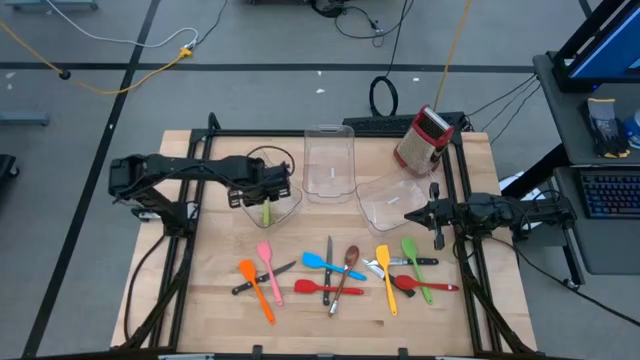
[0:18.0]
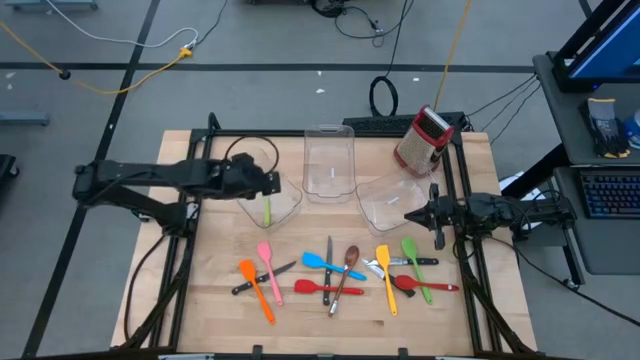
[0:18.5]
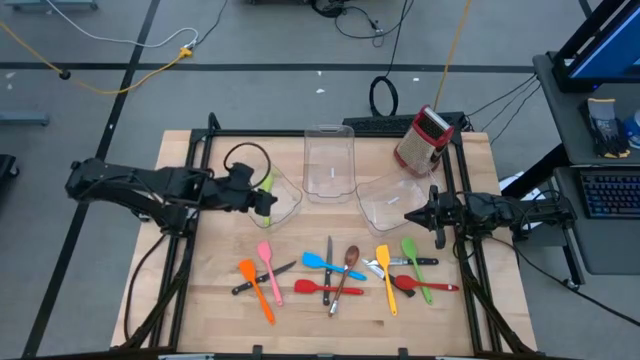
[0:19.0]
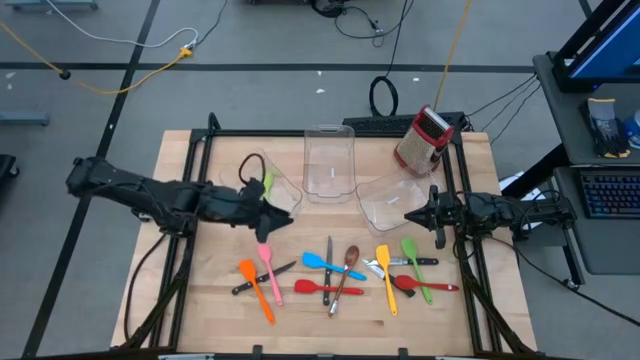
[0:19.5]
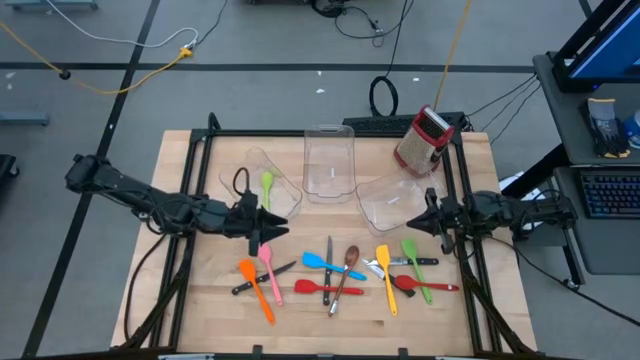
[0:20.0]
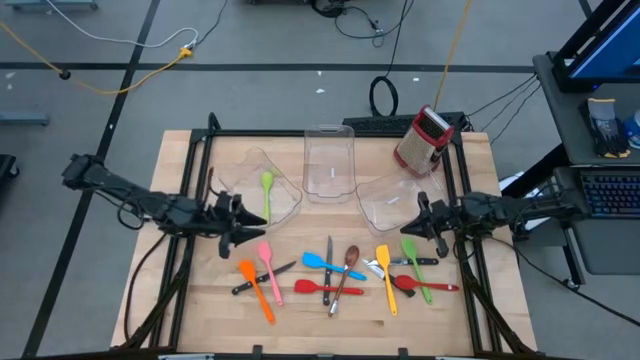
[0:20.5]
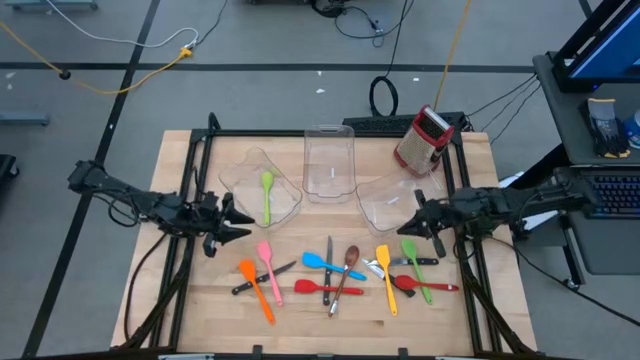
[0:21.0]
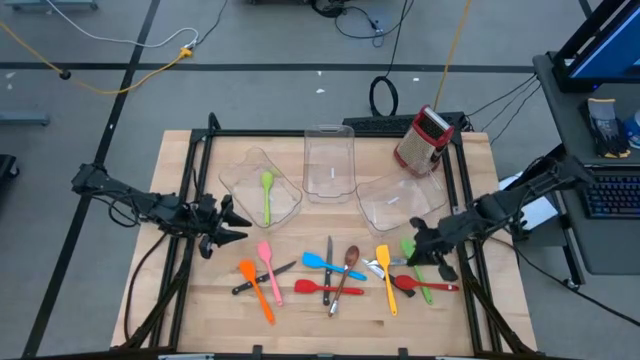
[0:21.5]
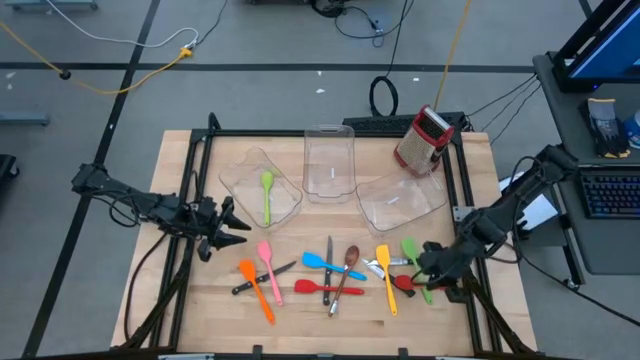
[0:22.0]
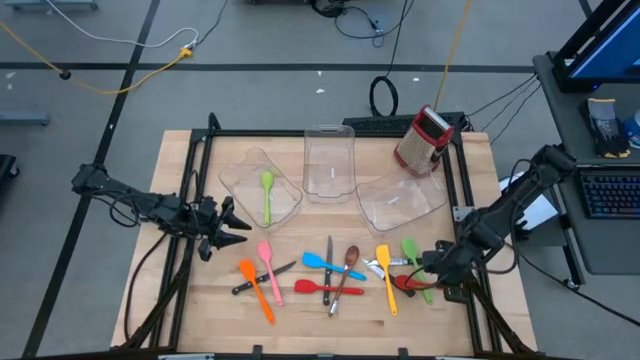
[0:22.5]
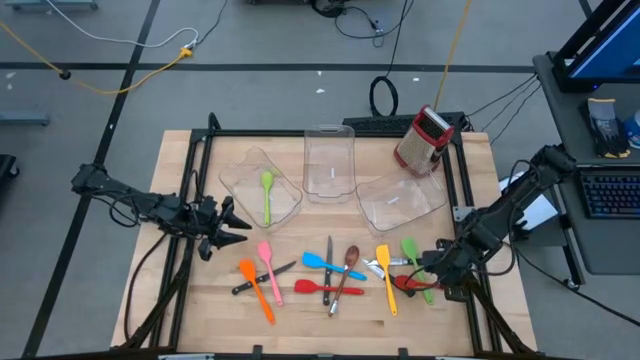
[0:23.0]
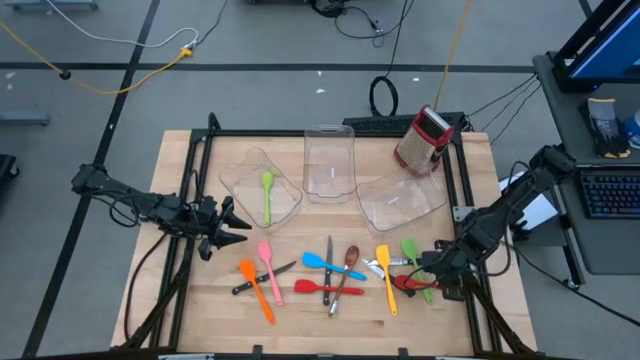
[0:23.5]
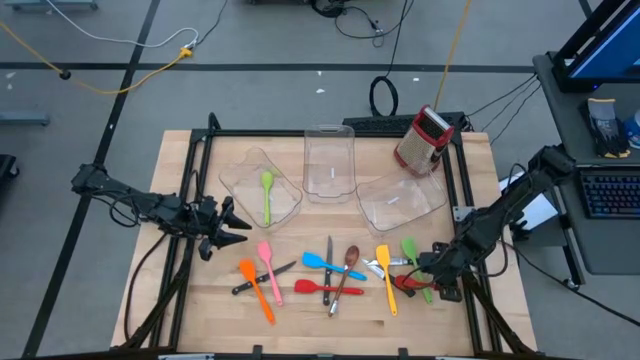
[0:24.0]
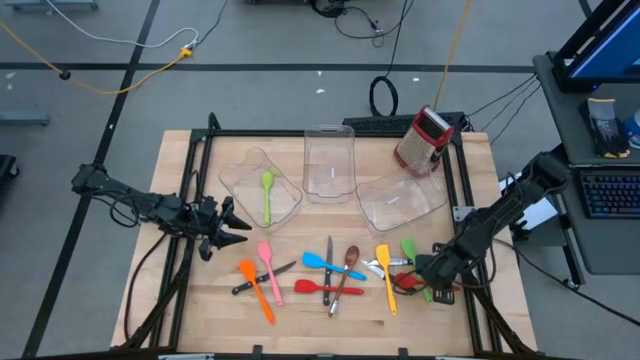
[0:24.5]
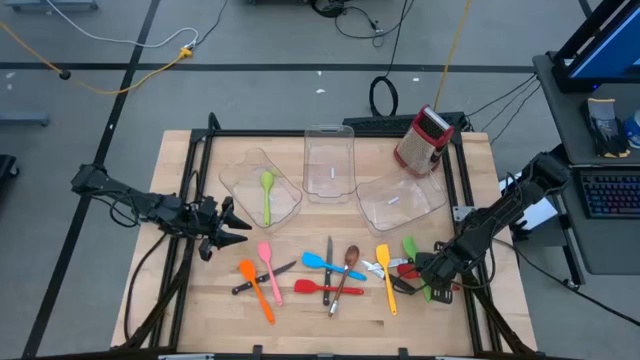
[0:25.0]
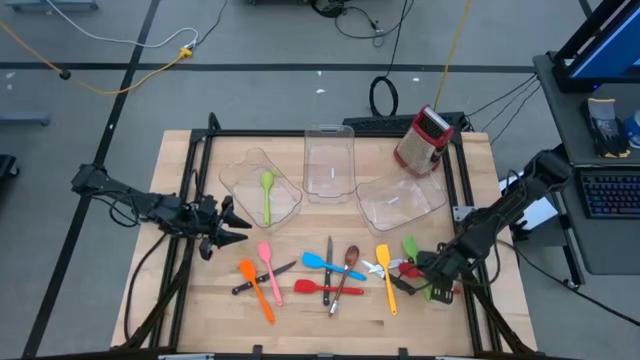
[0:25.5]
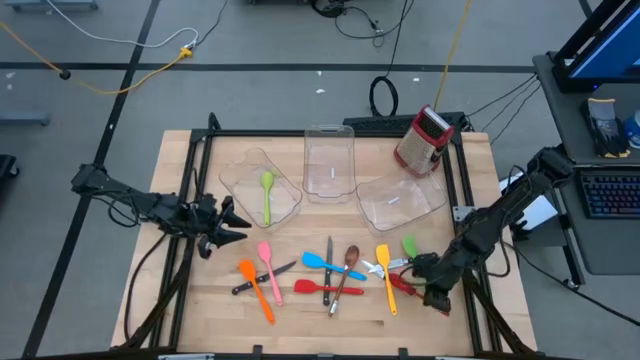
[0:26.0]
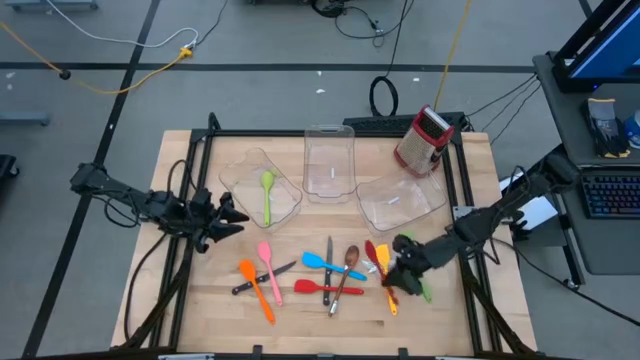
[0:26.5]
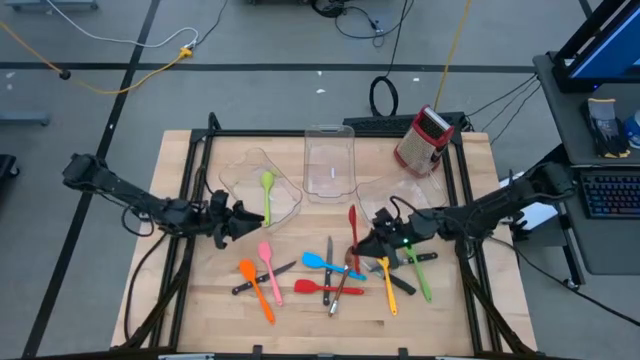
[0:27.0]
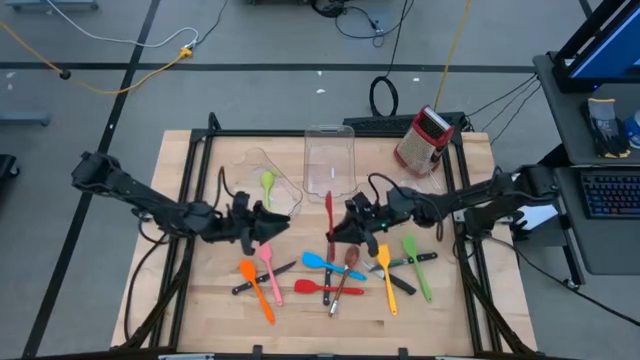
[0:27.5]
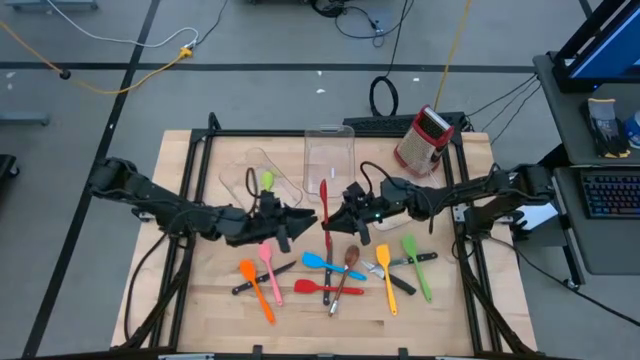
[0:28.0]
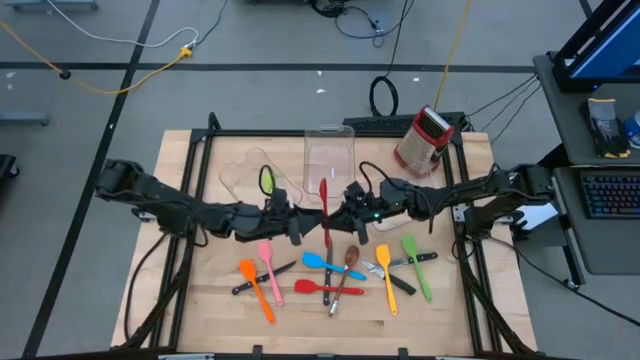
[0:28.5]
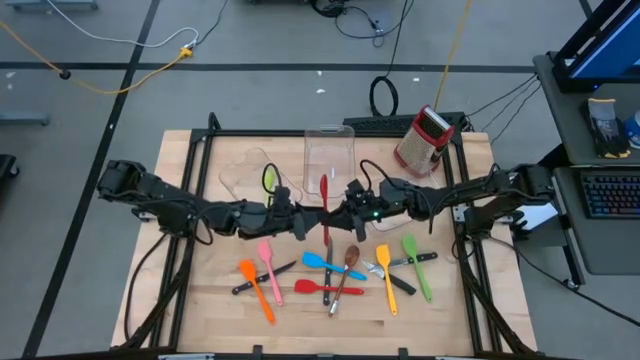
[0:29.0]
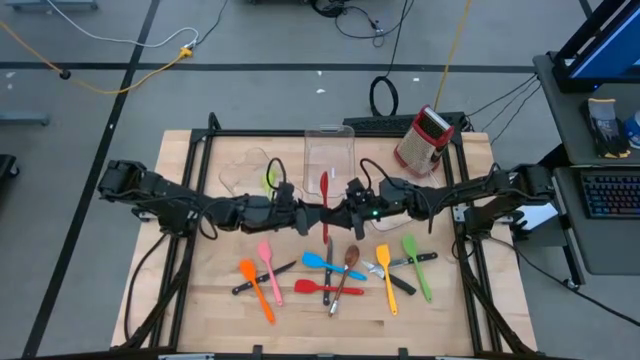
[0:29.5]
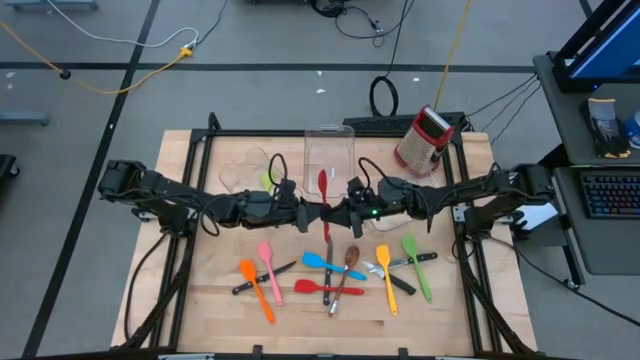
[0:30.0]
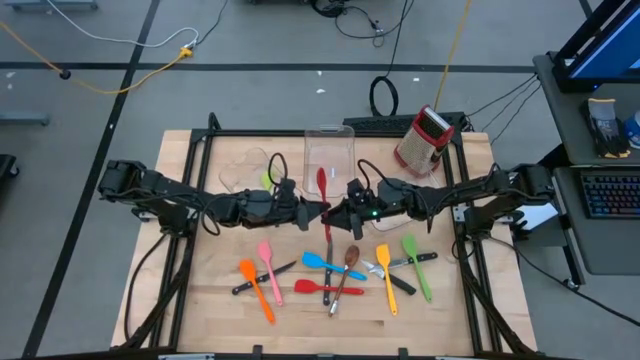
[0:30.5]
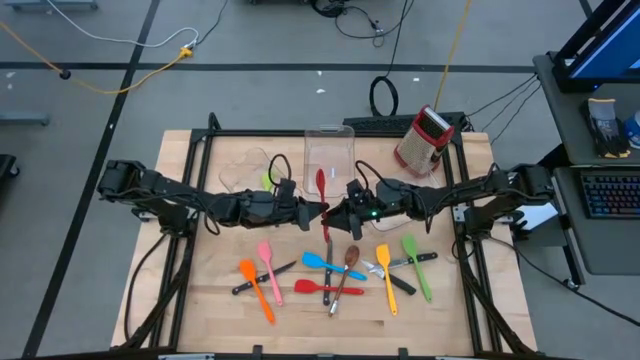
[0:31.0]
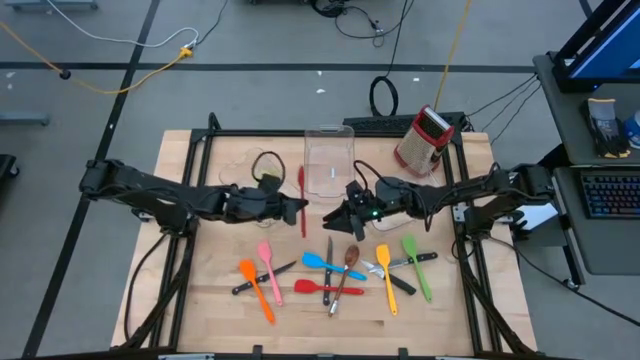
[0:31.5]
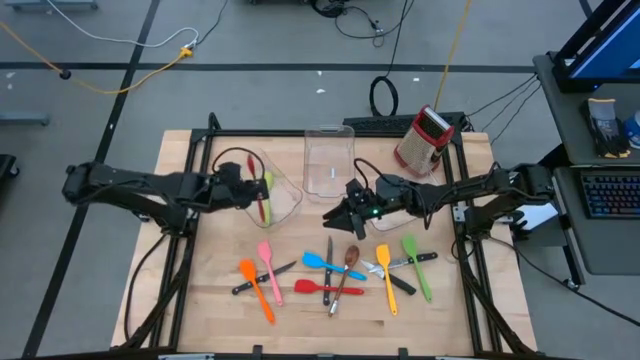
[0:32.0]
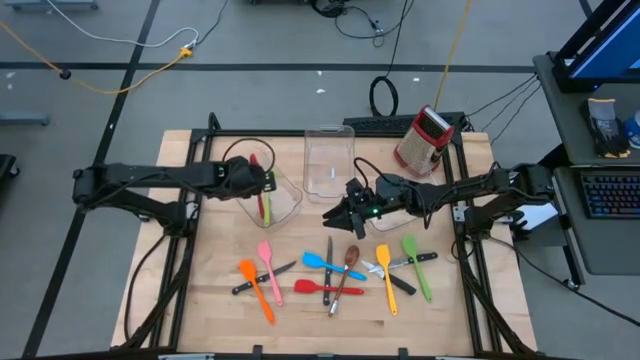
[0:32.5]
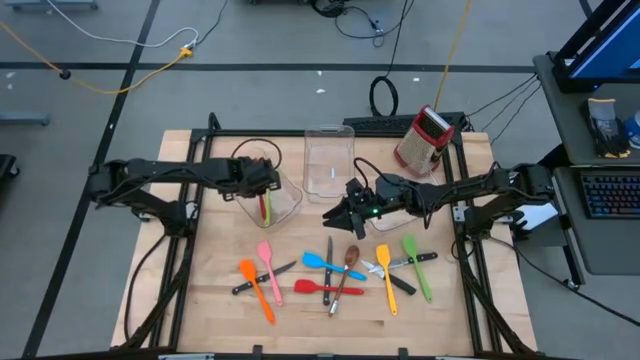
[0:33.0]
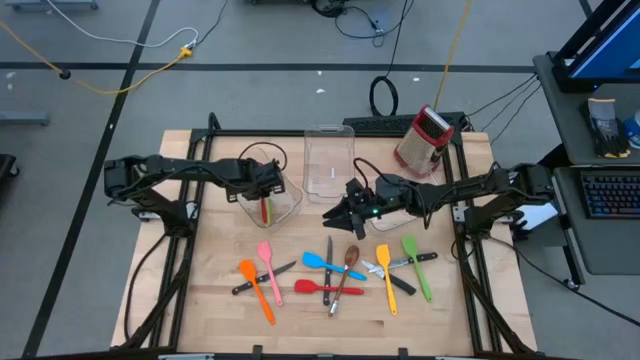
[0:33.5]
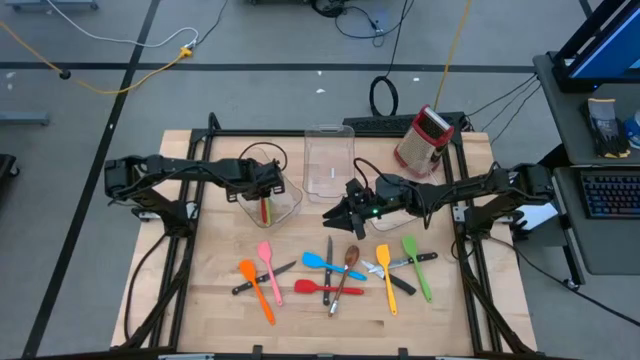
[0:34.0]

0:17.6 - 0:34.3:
Task: Pick & Place Kitchen Items
Put the right red serving spoon into the left bin

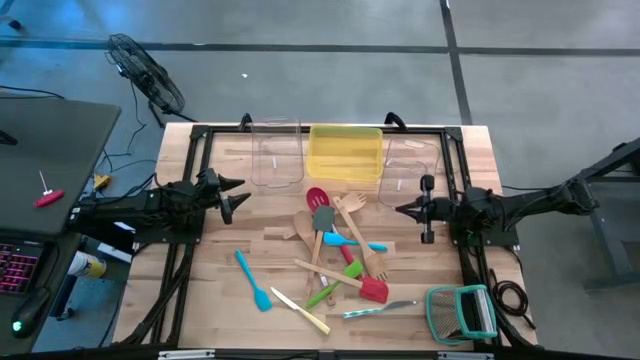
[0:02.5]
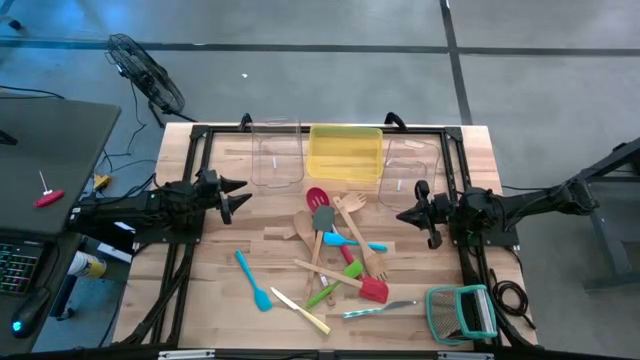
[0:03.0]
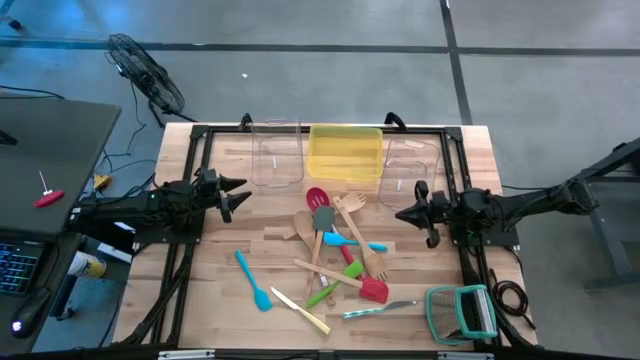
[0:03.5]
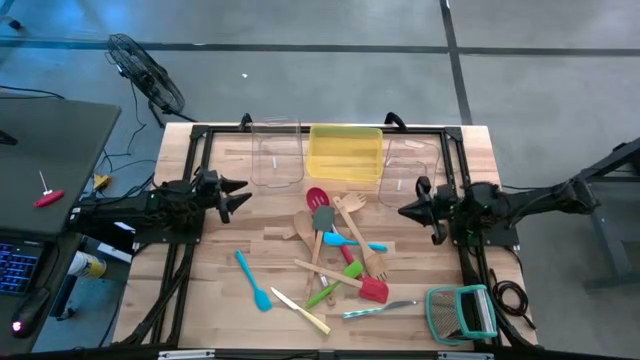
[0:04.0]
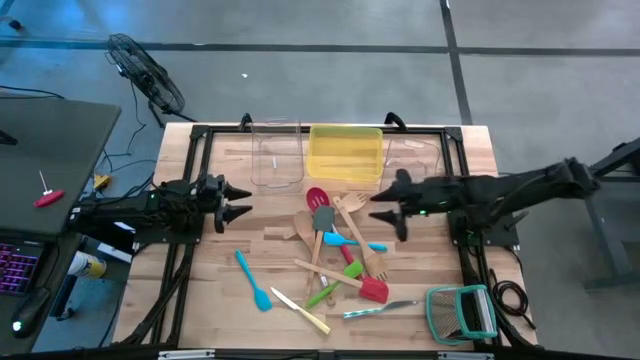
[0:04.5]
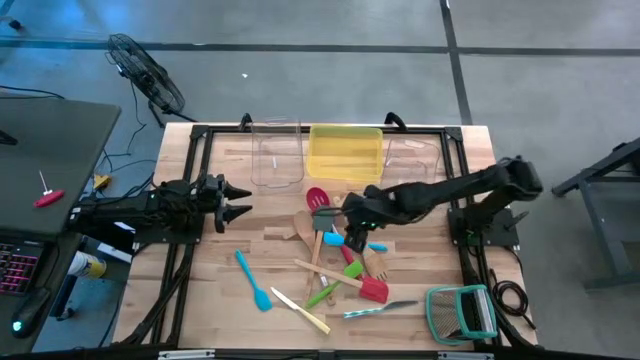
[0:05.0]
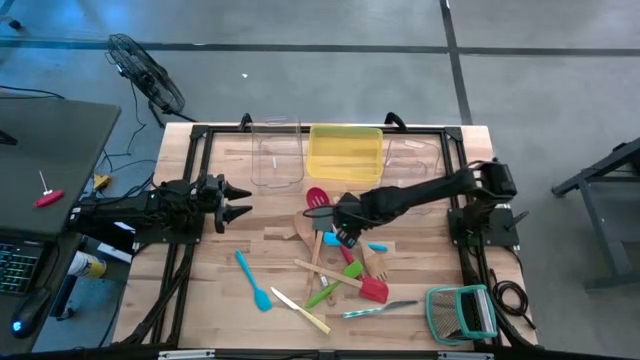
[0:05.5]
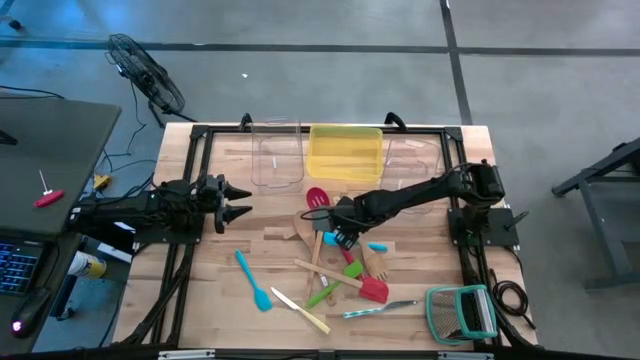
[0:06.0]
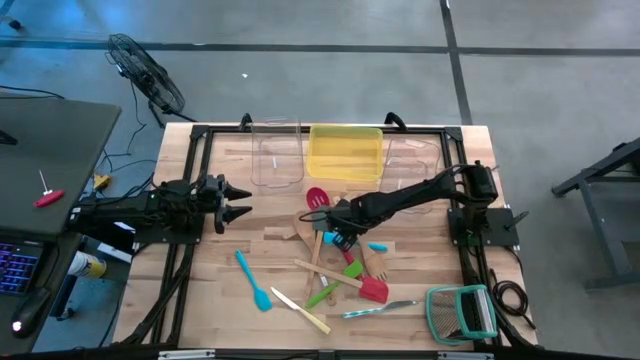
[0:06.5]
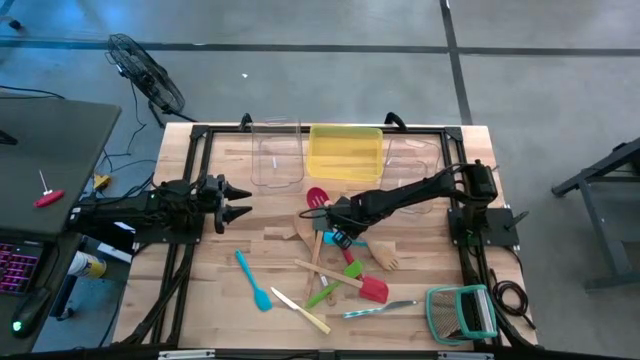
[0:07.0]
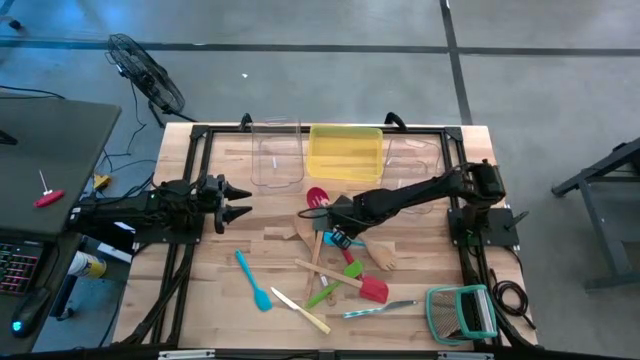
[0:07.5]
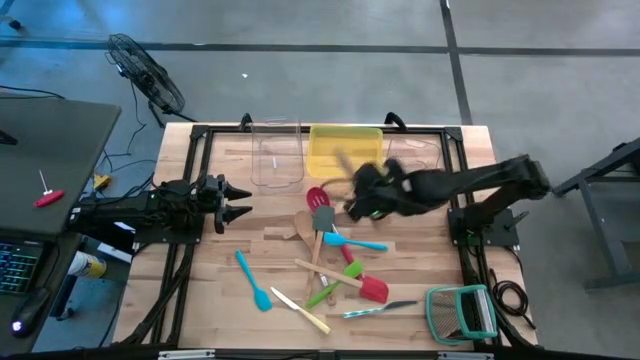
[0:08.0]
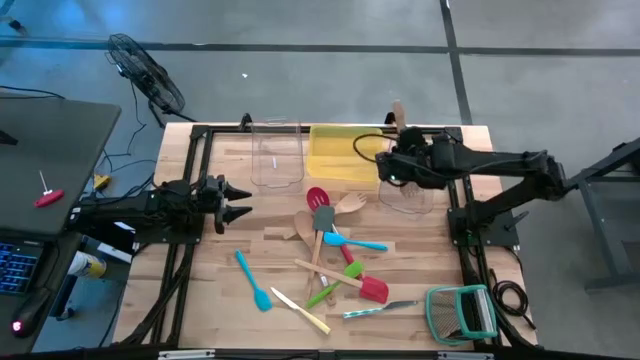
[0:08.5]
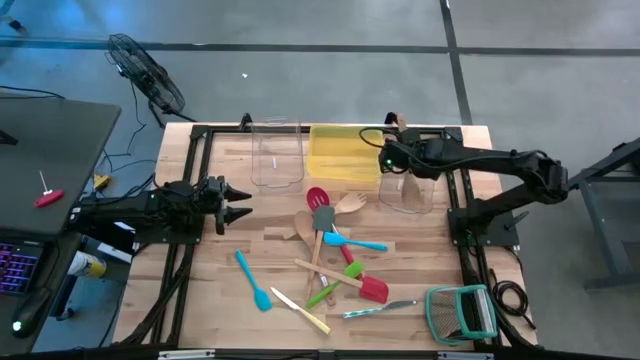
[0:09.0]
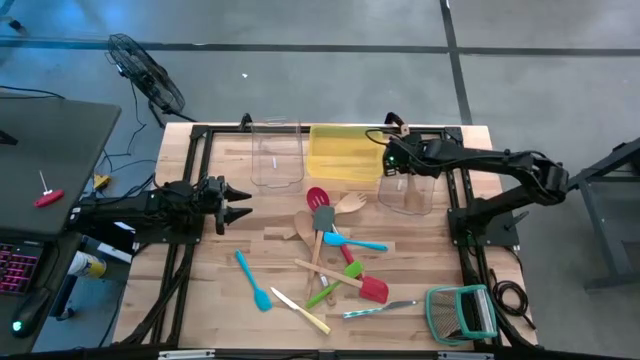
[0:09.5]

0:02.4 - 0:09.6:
Task: Pick & Place Kitchen Items
Put the brown serving spoon into the right transparent bin
